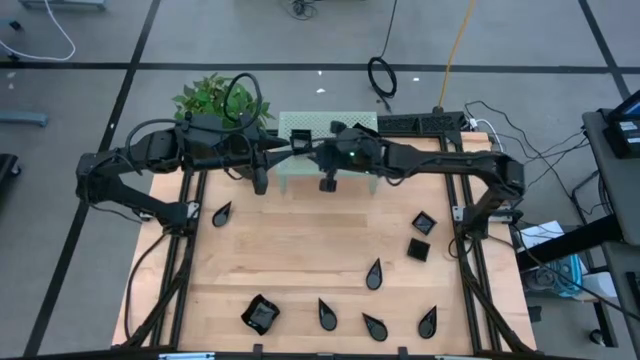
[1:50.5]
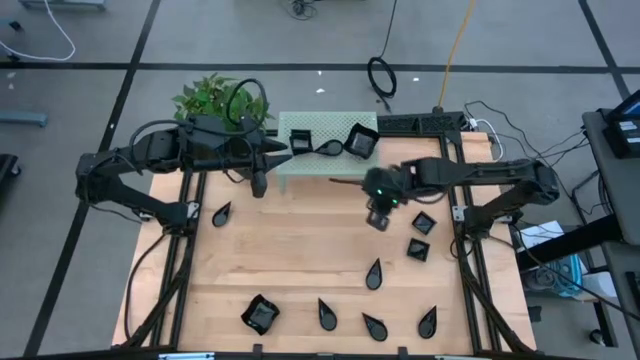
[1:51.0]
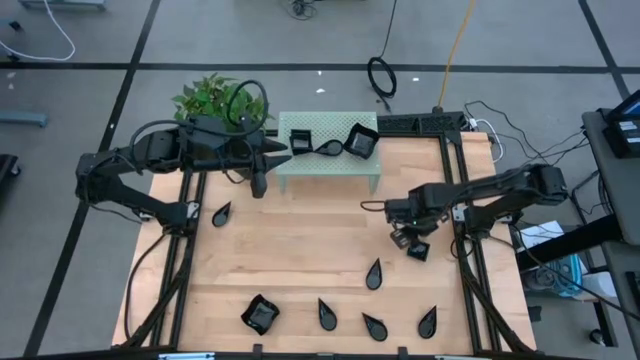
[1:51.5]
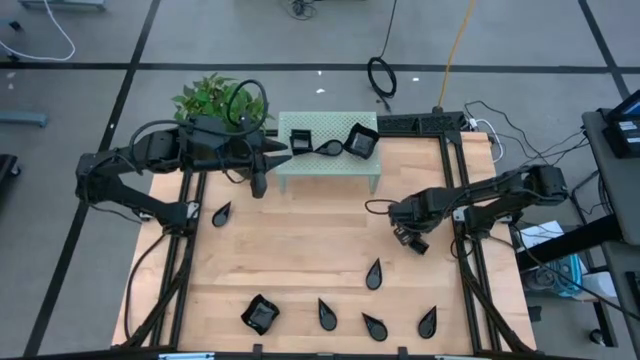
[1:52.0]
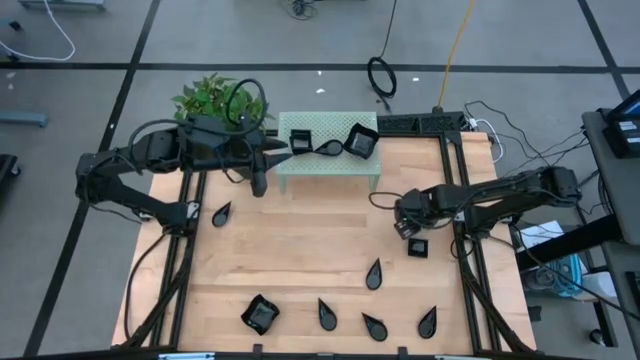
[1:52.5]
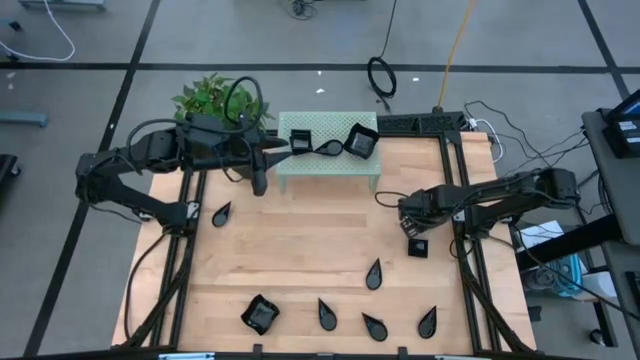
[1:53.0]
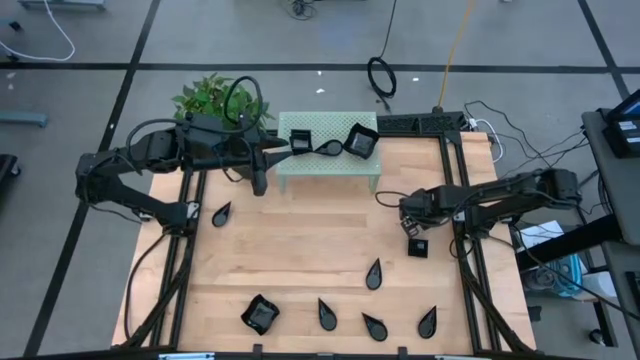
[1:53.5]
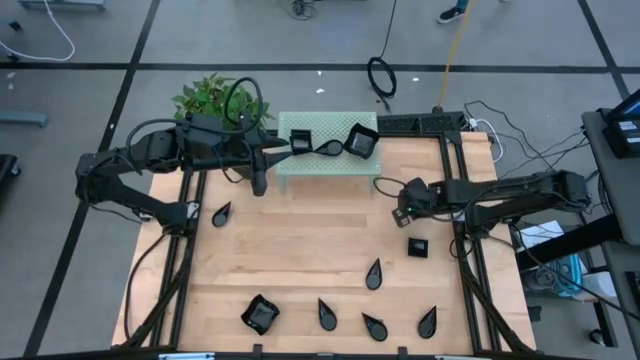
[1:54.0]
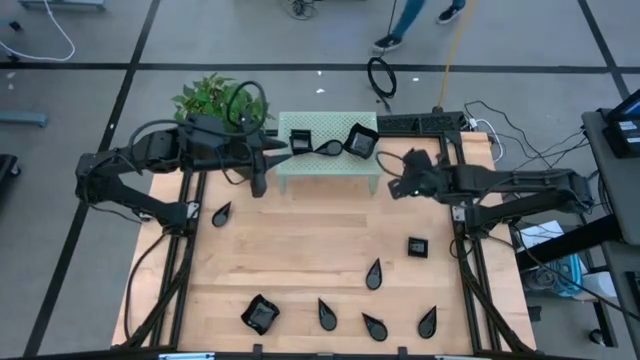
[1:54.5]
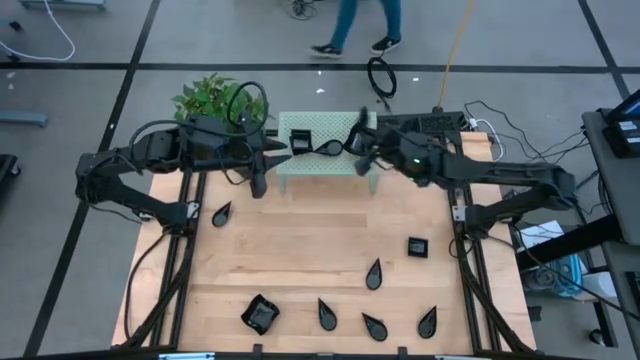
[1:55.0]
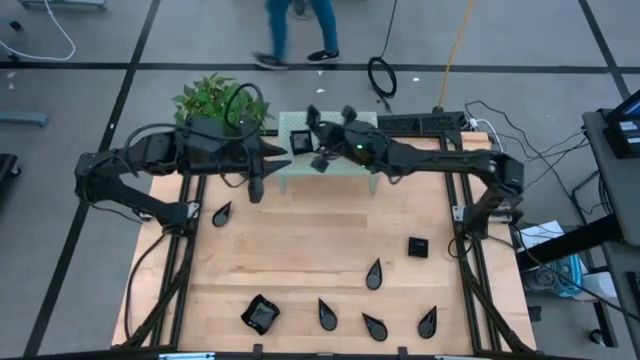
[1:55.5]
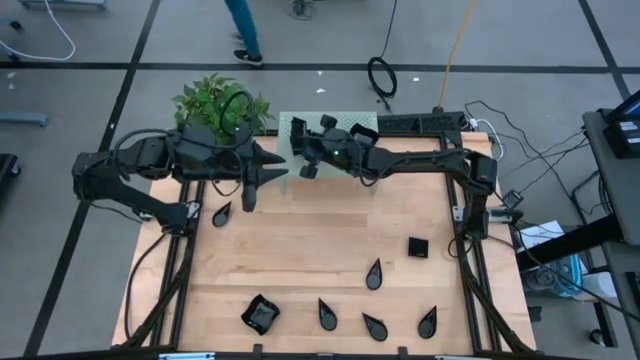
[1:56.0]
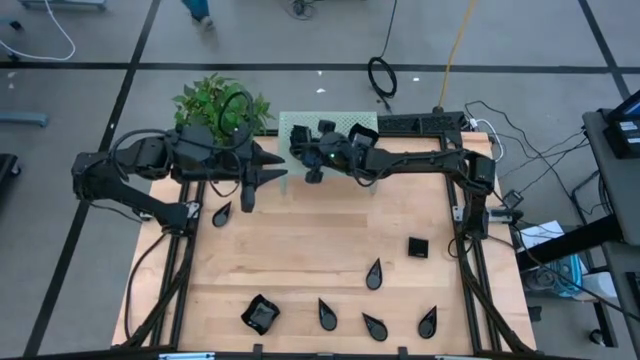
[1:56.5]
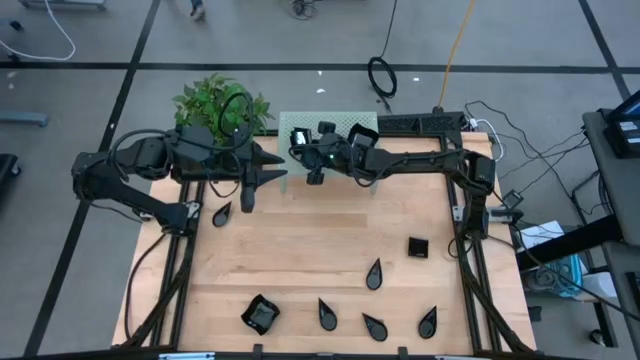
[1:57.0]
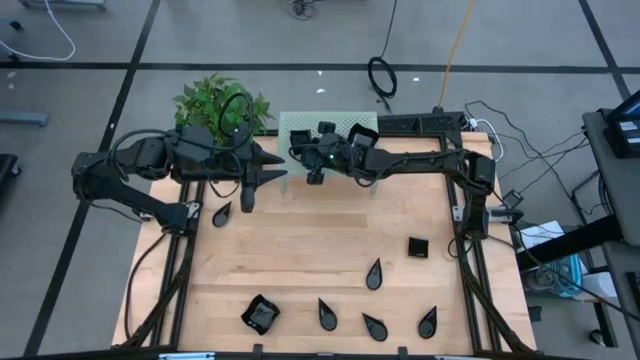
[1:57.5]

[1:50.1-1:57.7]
Task: Pick & Place Mini shaped plates
Stack the square plate on top of the other square plate on the shelf

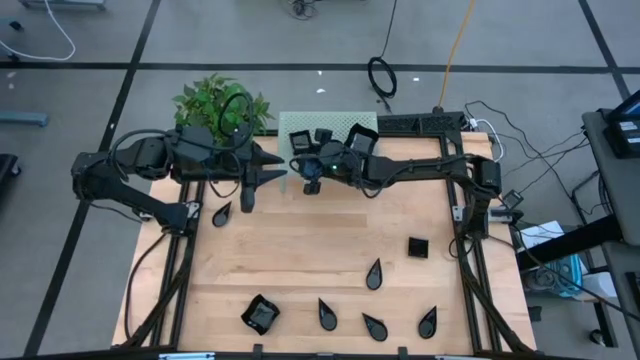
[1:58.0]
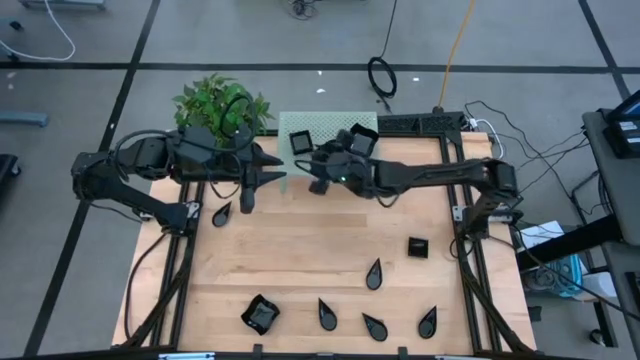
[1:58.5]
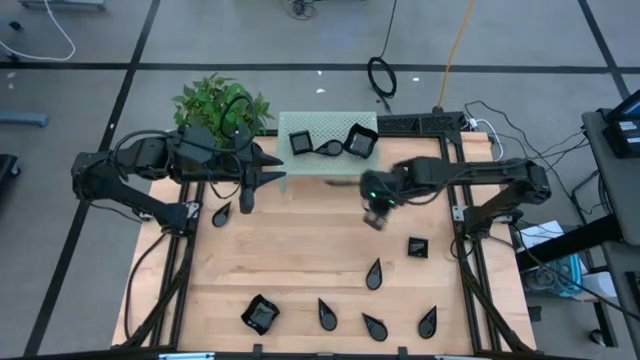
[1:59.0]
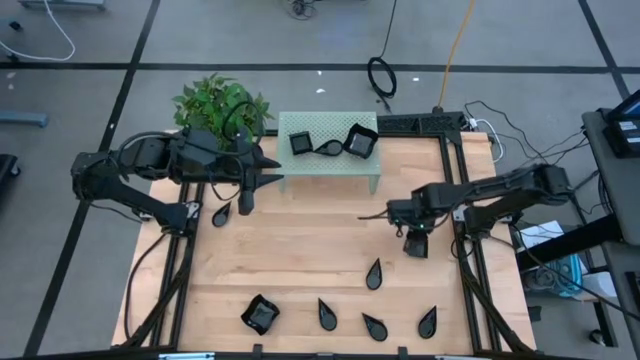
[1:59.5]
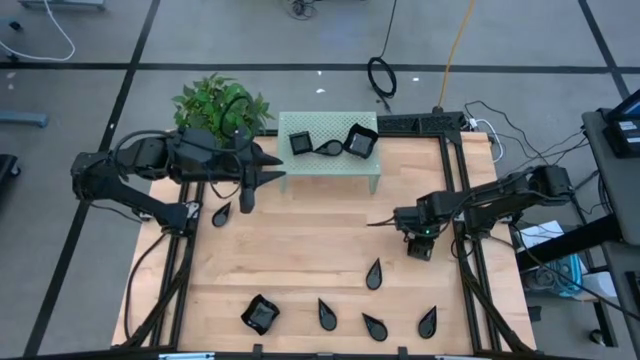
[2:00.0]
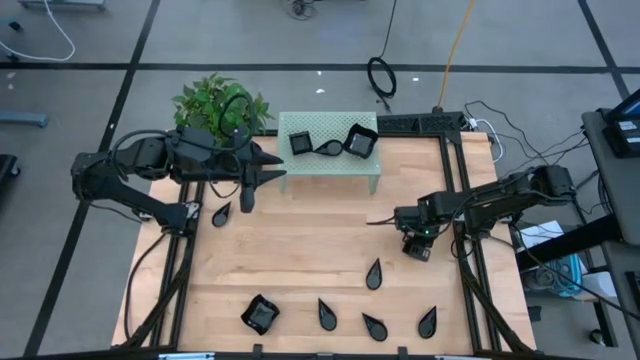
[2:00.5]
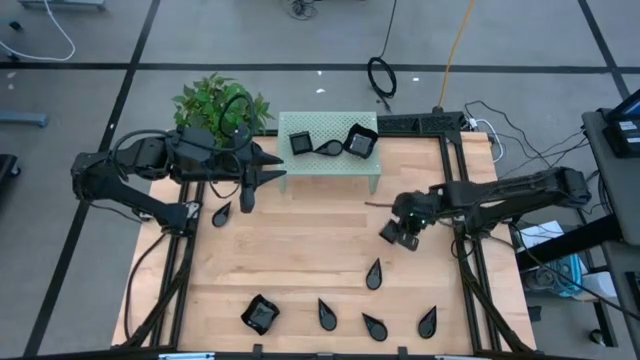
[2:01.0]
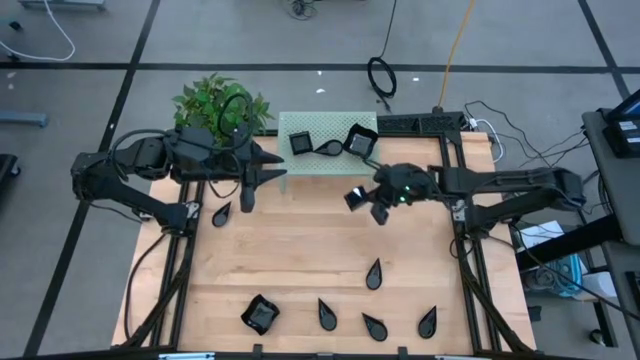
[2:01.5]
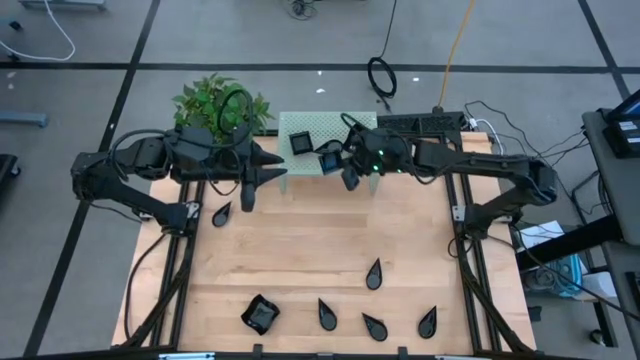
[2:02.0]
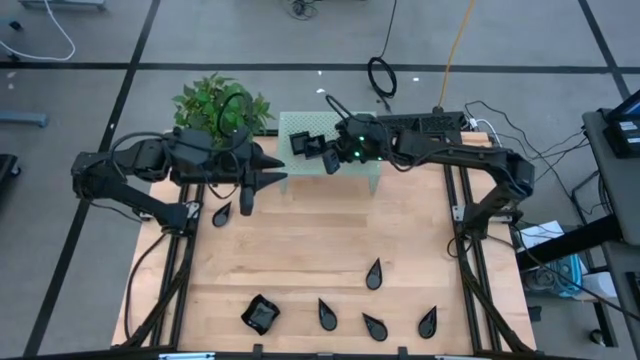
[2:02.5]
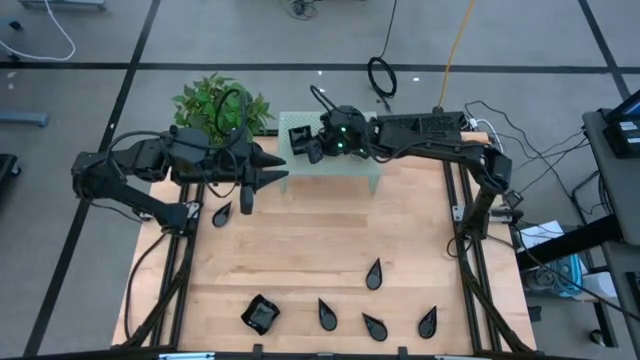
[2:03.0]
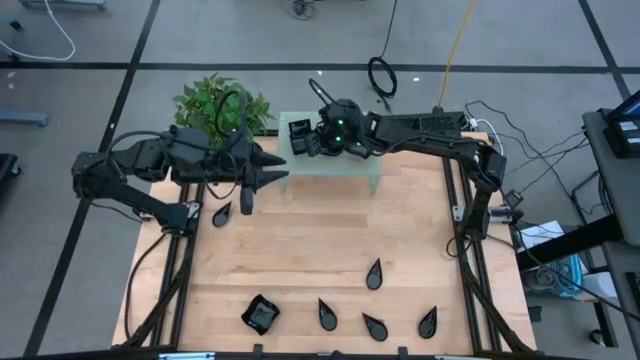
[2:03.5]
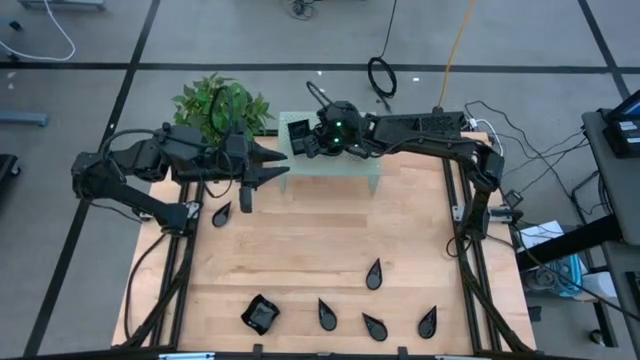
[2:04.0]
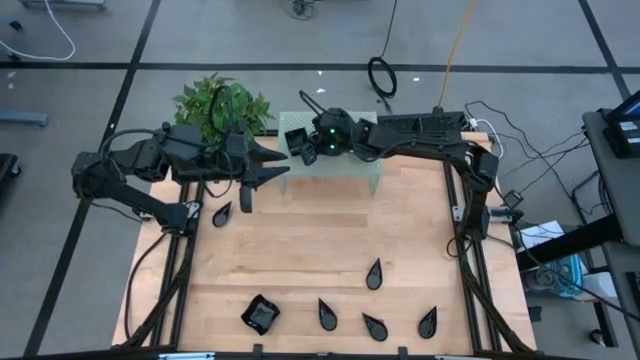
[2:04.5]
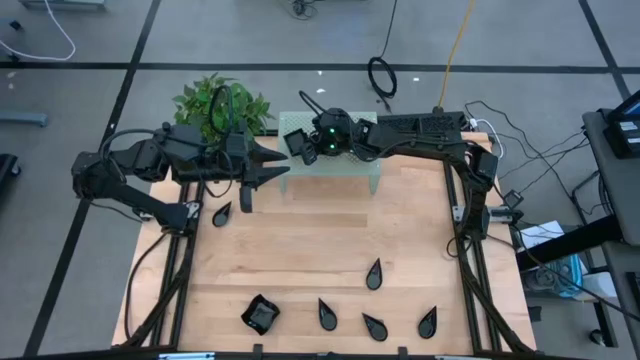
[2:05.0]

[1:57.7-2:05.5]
Stack the square plate on top of the other square plate on the shelf

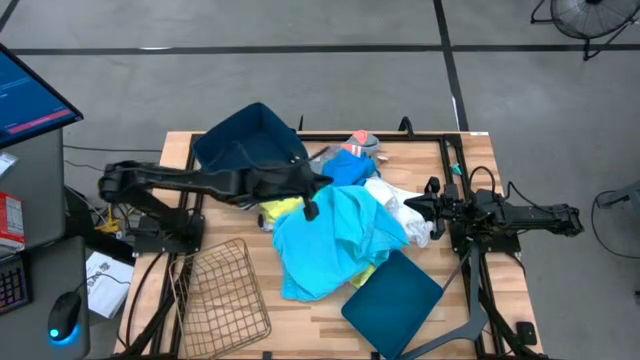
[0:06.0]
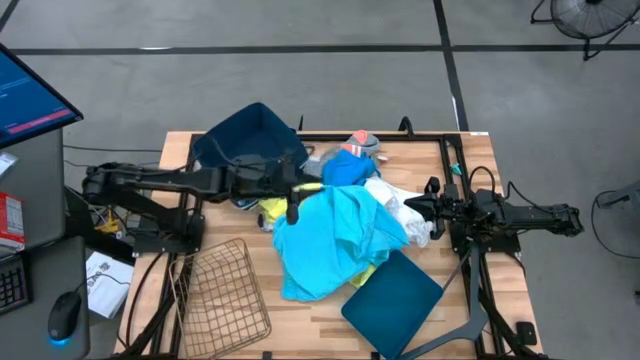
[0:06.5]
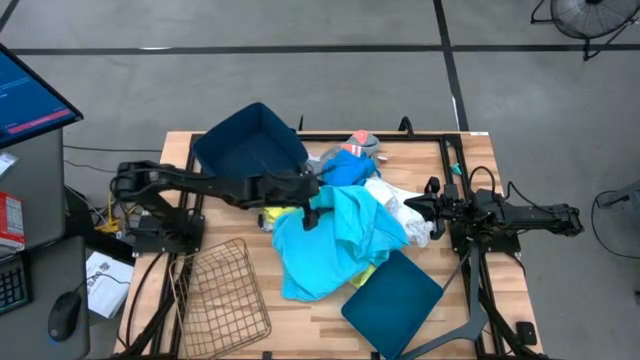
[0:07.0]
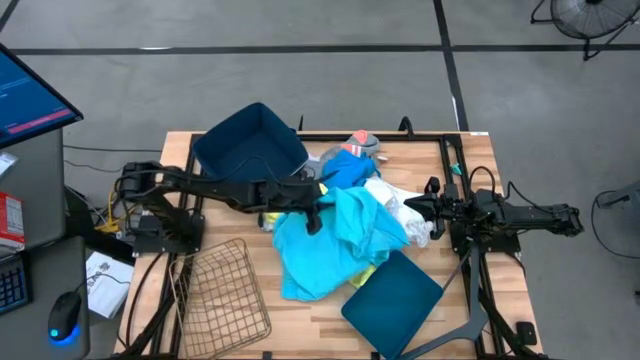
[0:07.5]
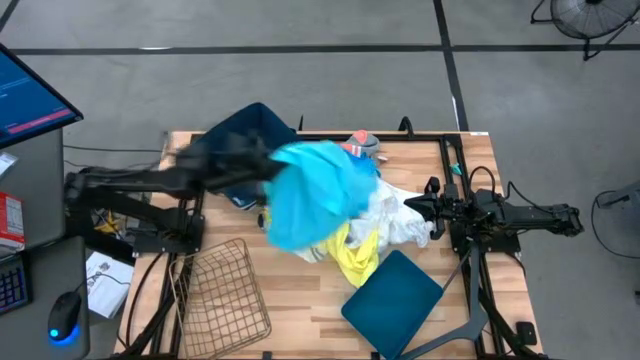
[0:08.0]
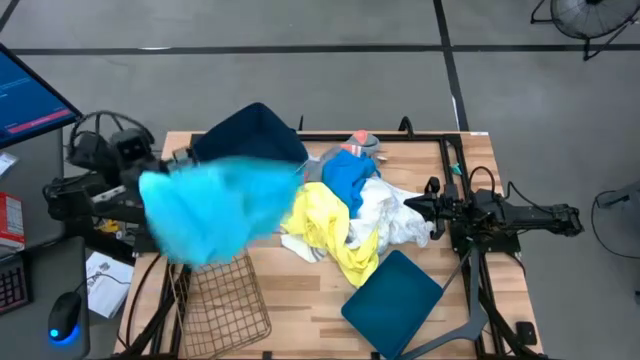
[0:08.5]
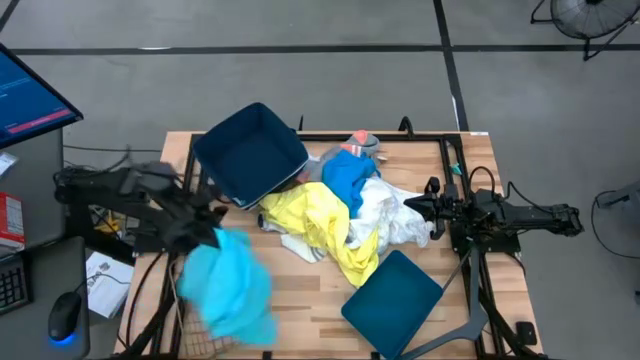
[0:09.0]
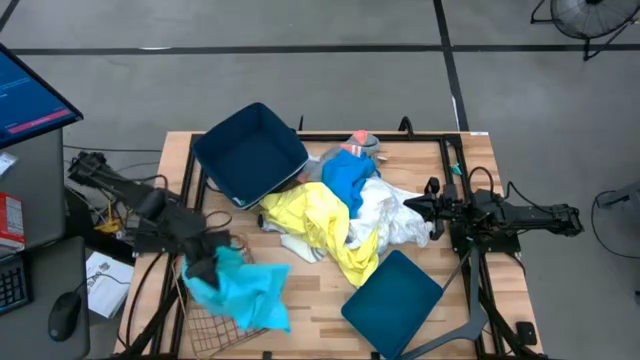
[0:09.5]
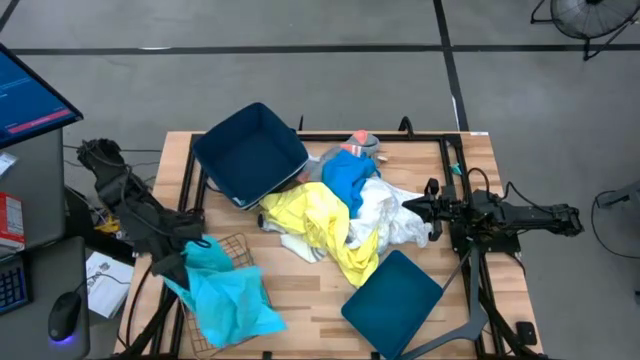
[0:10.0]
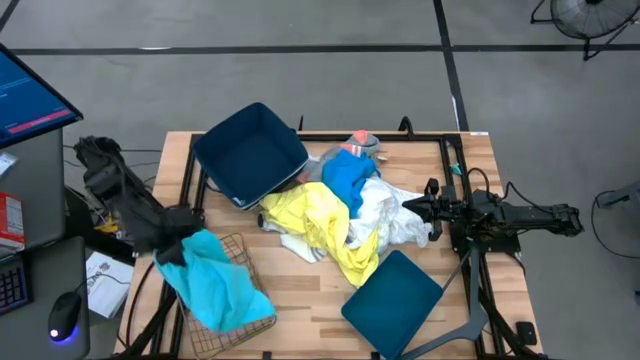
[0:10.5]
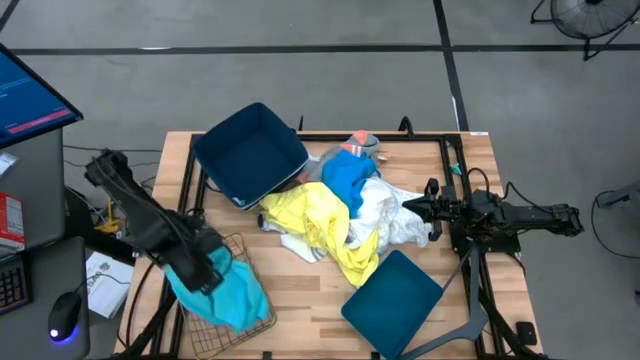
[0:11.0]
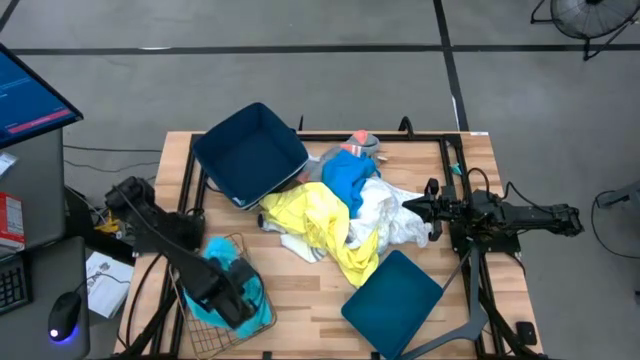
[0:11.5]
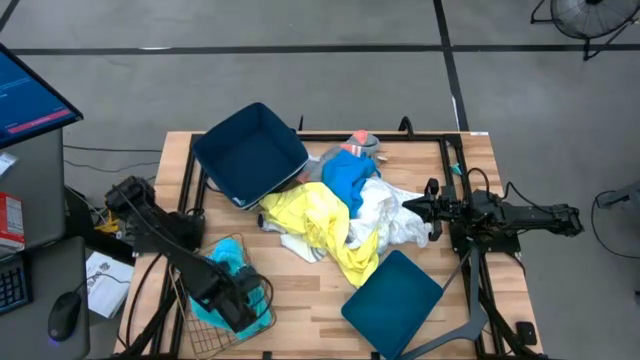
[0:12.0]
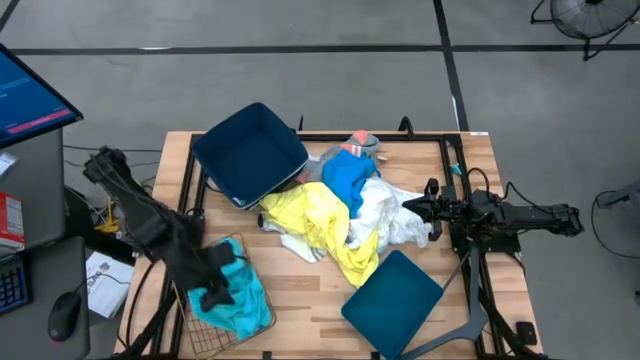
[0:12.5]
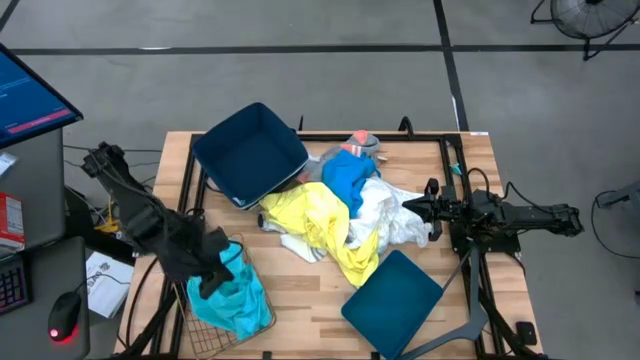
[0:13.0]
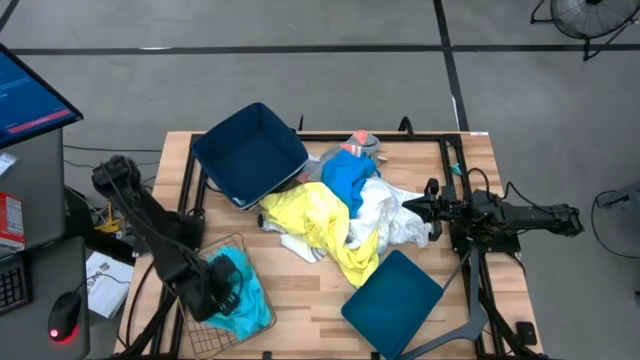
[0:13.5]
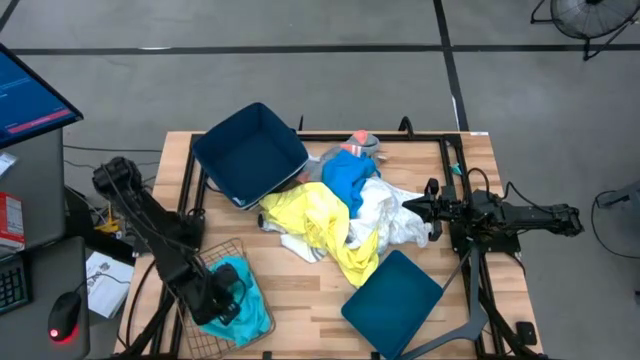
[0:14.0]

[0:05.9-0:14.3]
Task: Pick & Place Cloths
Put the light blue short into the wire basket
